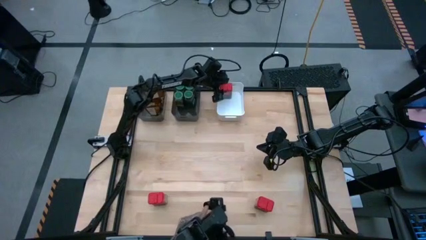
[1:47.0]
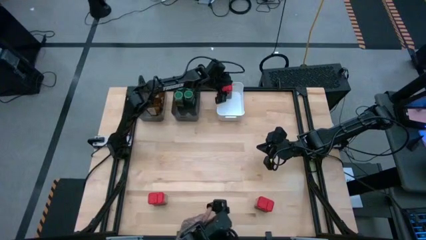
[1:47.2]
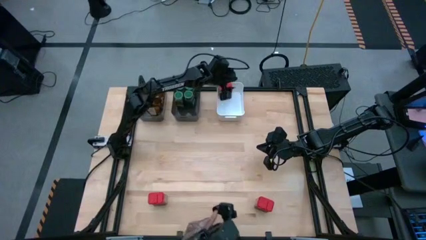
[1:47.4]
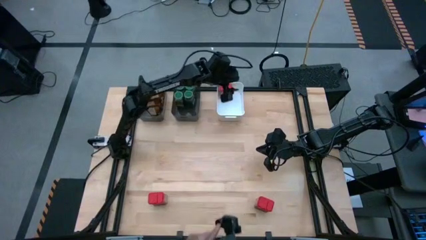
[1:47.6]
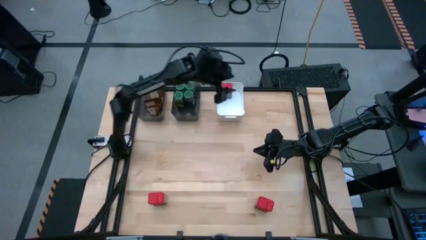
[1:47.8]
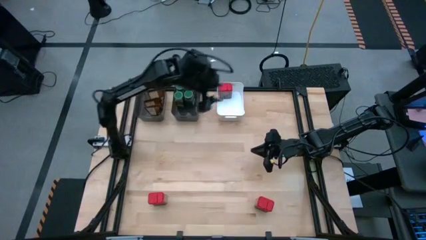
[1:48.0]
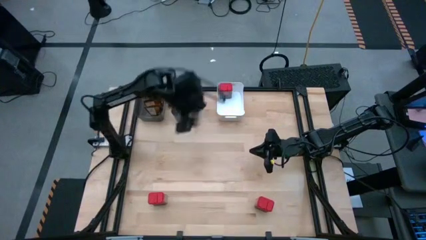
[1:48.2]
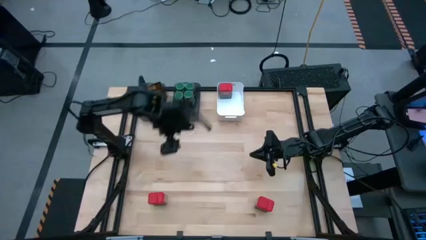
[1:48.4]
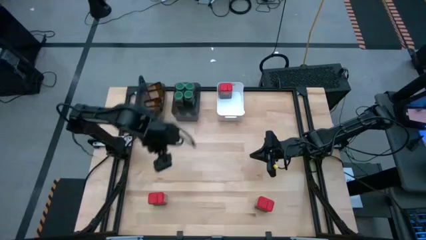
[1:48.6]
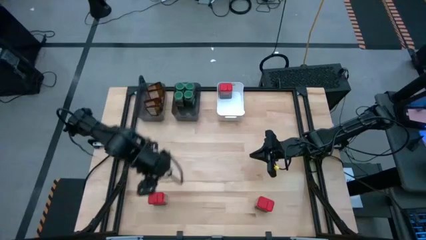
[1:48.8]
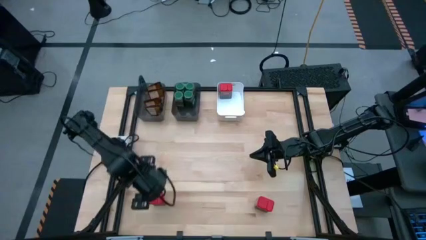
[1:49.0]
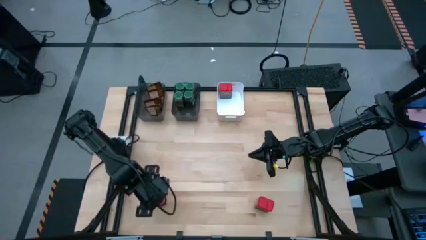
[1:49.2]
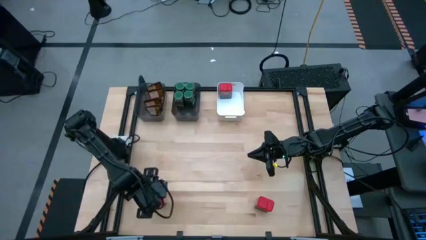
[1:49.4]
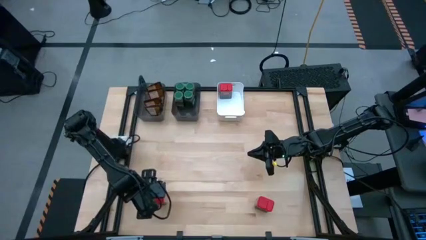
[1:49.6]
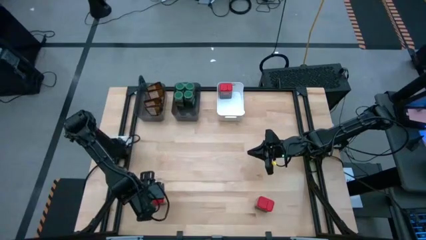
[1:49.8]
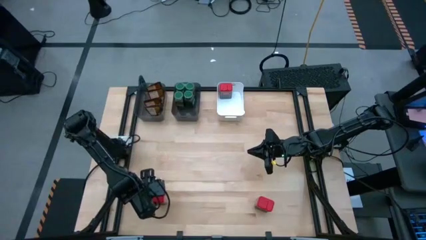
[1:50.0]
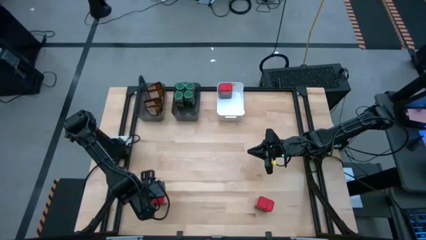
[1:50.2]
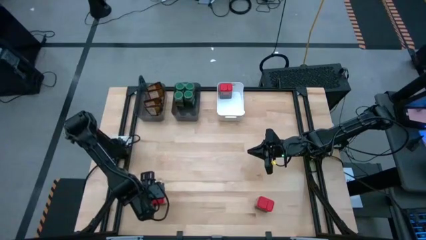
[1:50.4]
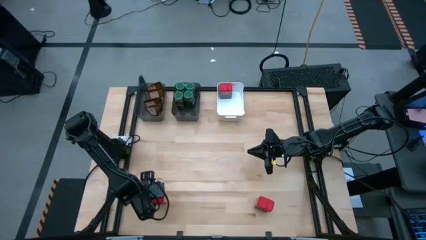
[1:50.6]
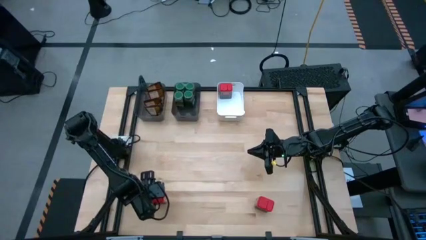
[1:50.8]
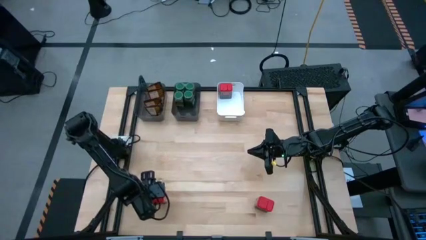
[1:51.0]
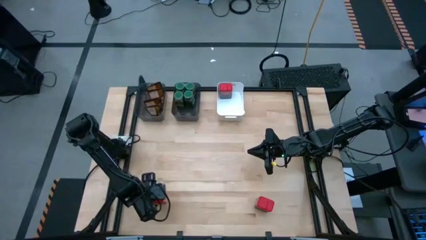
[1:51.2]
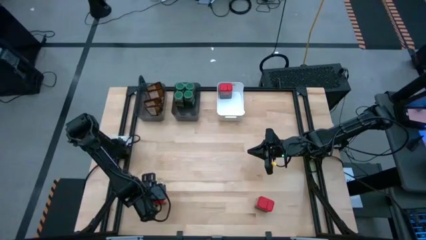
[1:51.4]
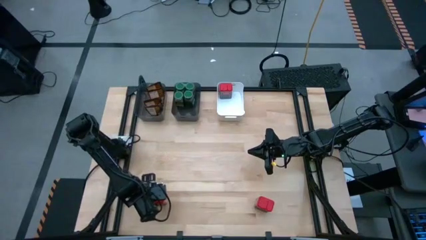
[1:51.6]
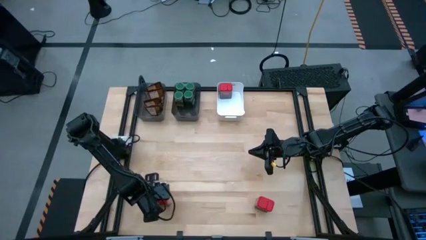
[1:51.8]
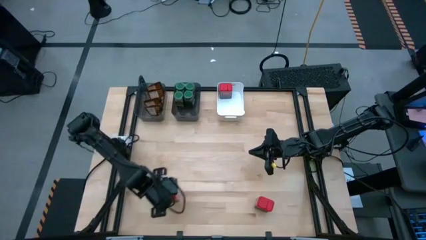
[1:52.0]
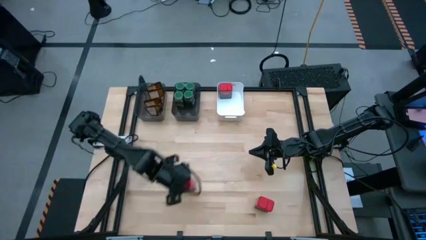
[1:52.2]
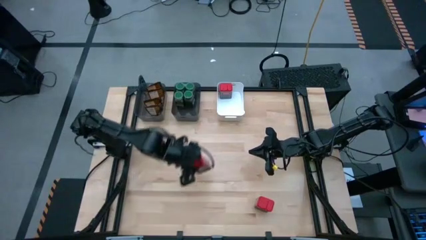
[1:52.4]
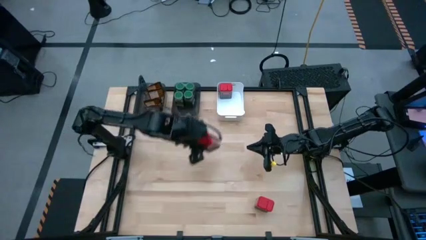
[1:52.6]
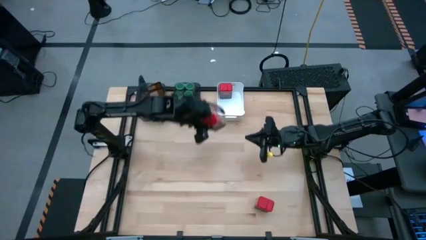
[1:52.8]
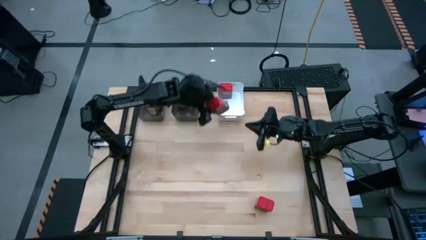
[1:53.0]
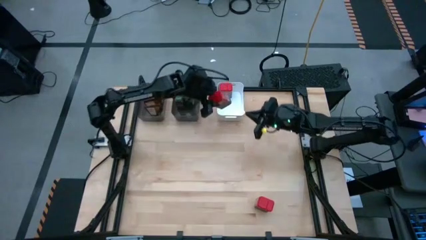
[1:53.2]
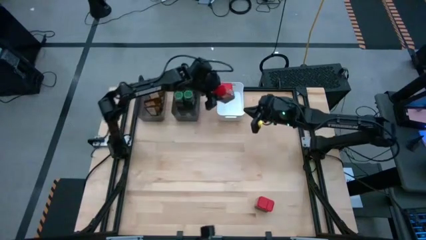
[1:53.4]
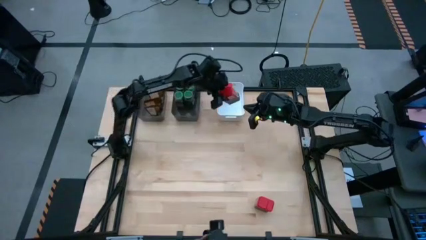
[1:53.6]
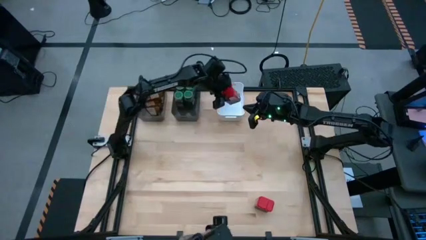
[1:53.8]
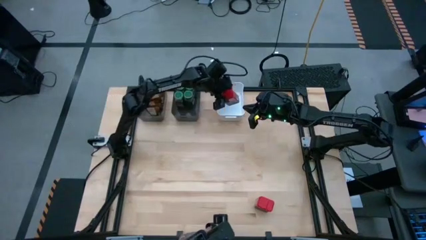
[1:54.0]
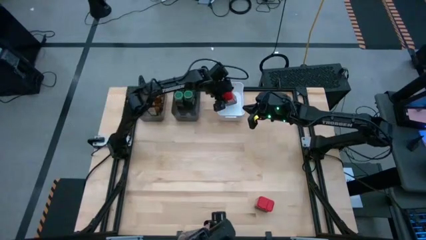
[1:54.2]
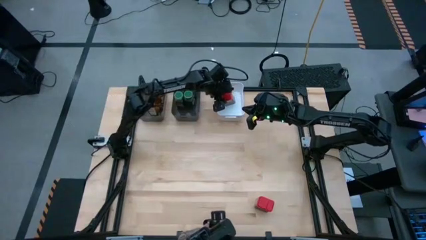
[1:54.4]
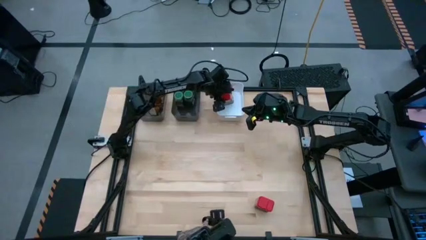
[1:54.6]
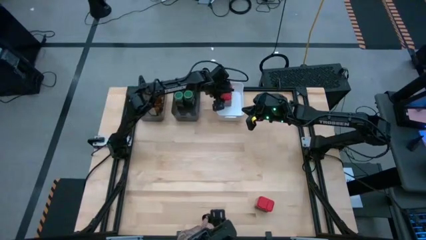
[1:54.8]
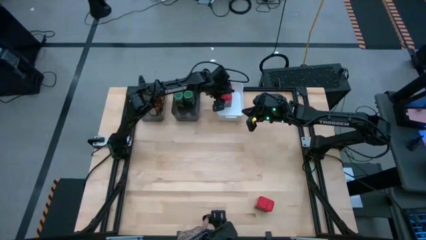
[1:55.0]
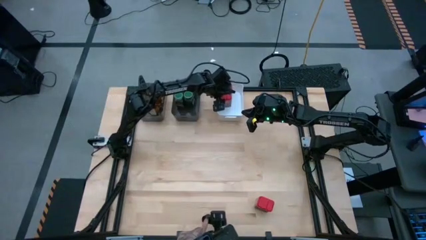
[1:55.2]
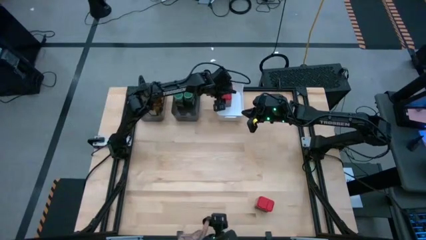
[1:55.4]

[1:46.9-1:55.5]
Task: Sort spices by type
Put the left red seasoning can into the white bin

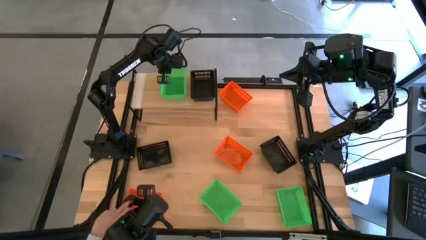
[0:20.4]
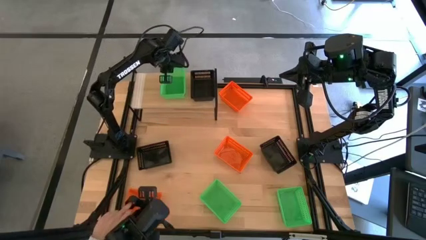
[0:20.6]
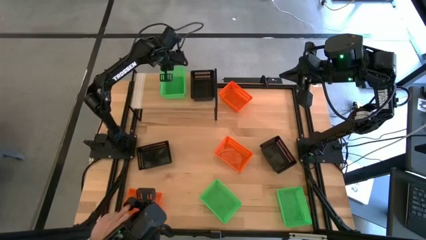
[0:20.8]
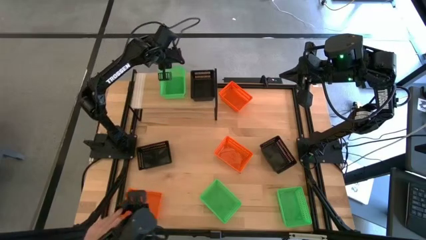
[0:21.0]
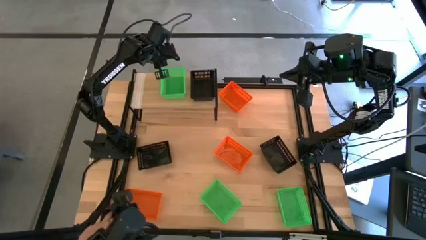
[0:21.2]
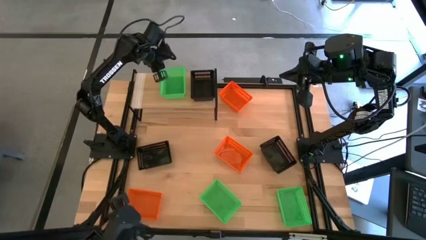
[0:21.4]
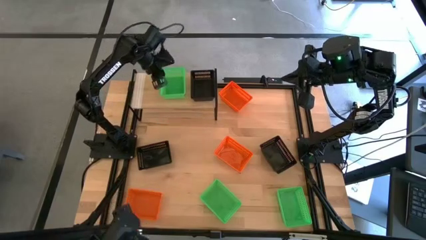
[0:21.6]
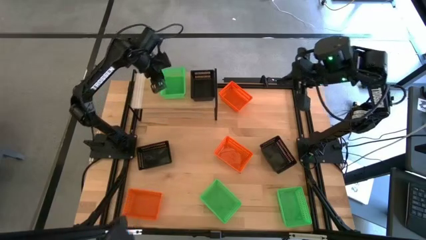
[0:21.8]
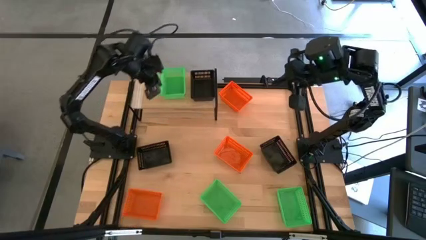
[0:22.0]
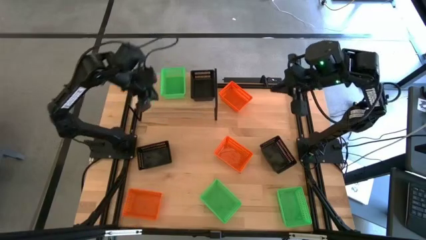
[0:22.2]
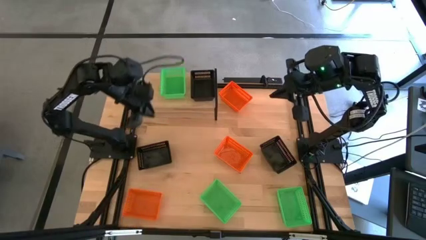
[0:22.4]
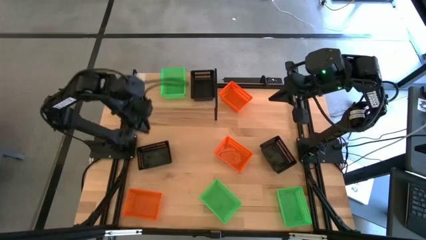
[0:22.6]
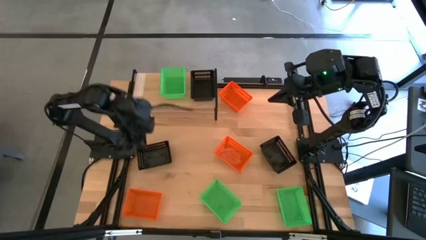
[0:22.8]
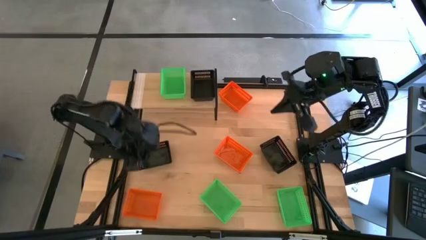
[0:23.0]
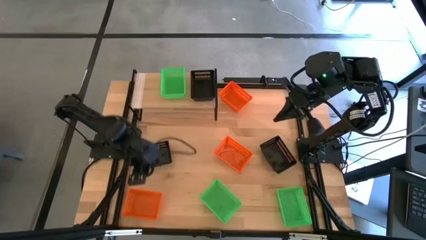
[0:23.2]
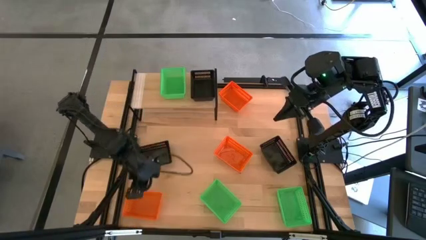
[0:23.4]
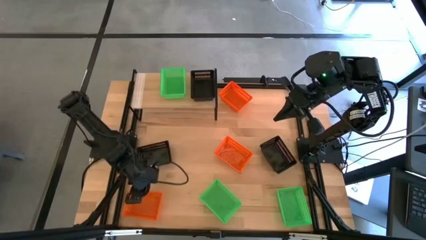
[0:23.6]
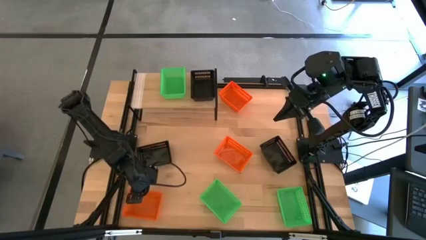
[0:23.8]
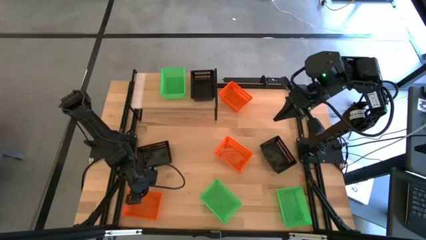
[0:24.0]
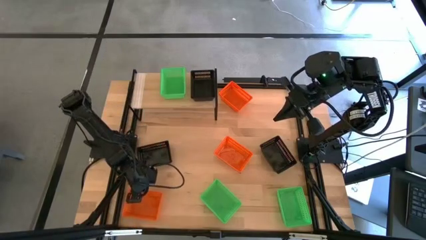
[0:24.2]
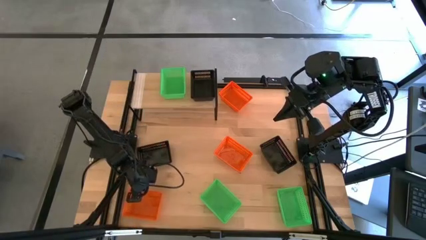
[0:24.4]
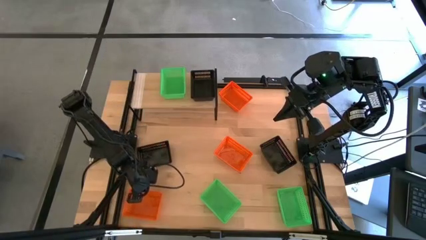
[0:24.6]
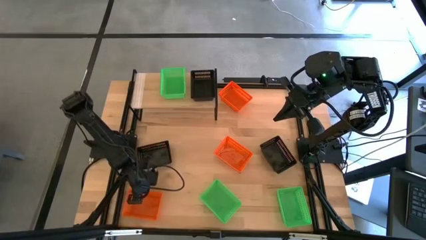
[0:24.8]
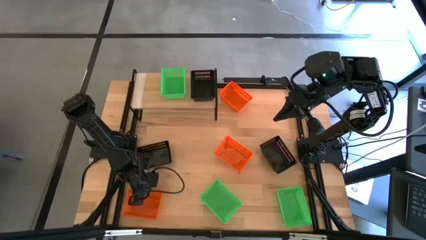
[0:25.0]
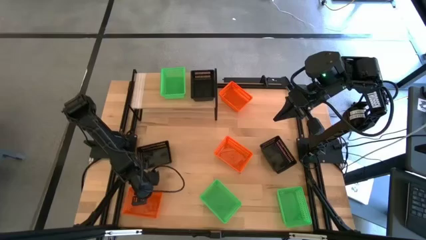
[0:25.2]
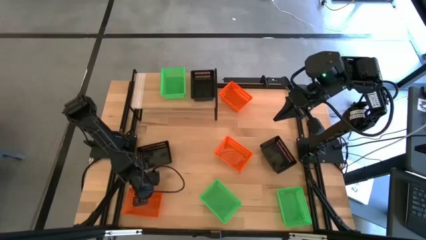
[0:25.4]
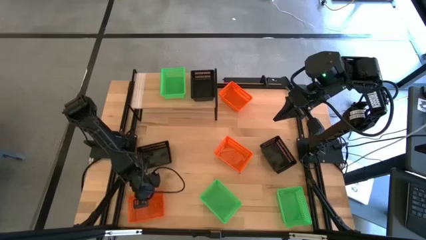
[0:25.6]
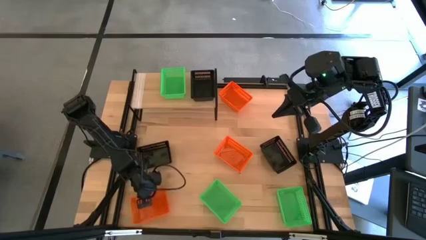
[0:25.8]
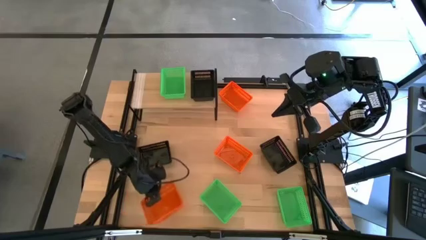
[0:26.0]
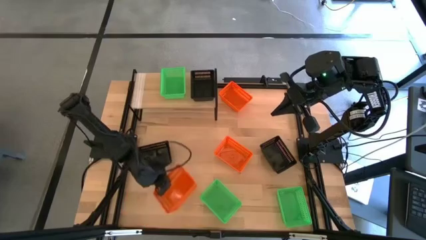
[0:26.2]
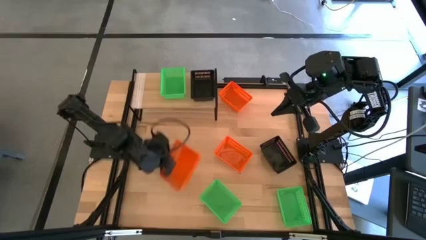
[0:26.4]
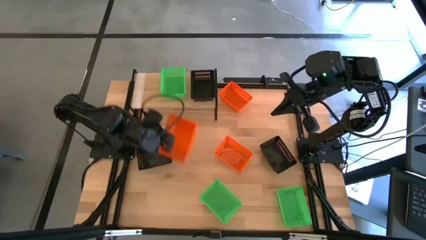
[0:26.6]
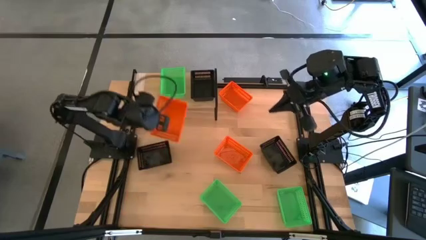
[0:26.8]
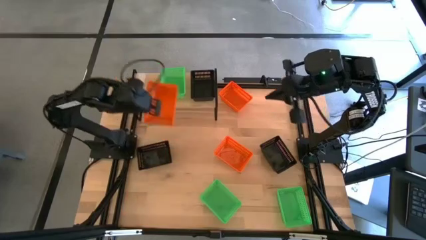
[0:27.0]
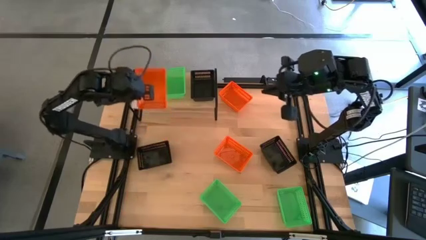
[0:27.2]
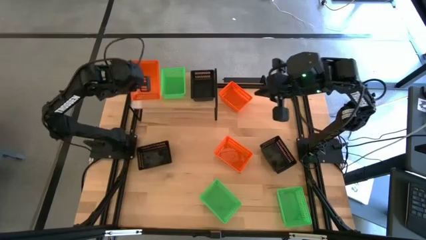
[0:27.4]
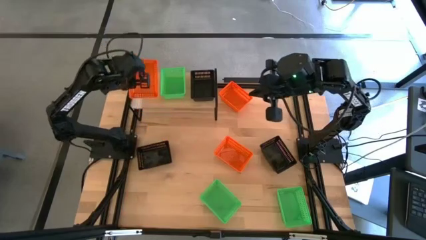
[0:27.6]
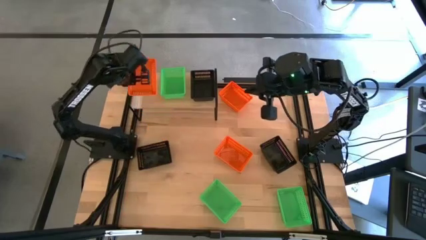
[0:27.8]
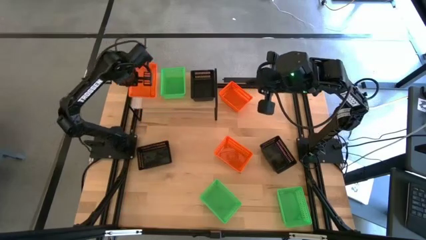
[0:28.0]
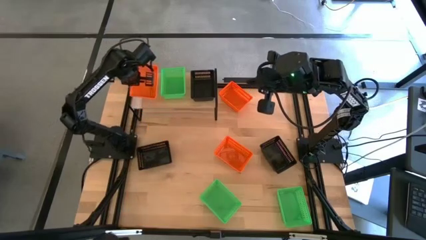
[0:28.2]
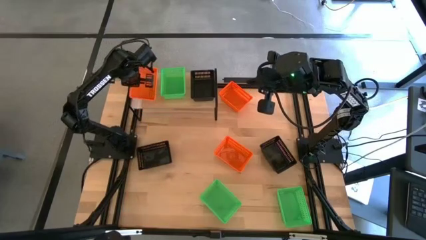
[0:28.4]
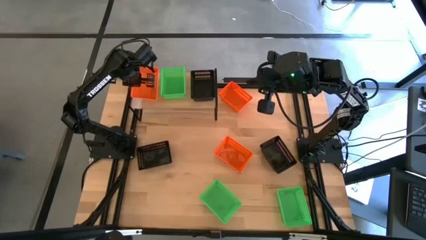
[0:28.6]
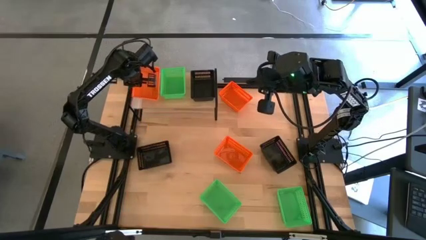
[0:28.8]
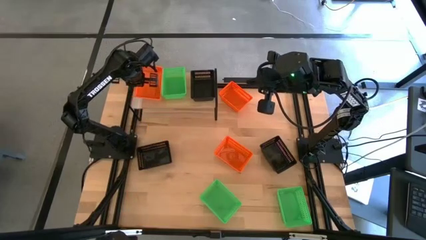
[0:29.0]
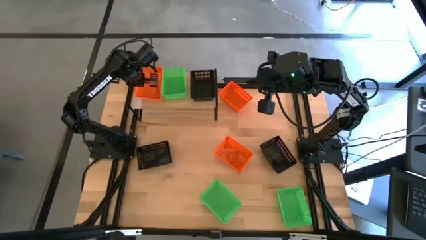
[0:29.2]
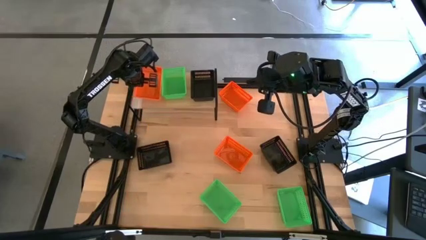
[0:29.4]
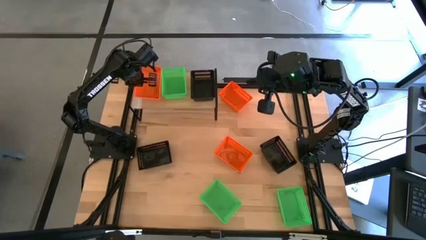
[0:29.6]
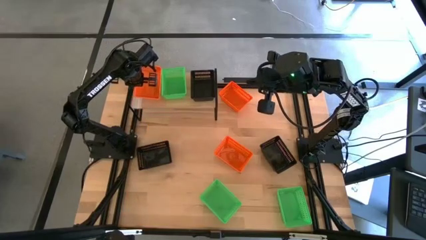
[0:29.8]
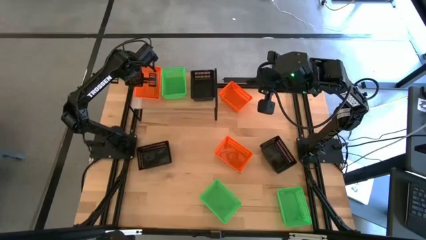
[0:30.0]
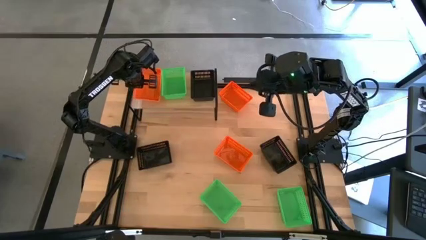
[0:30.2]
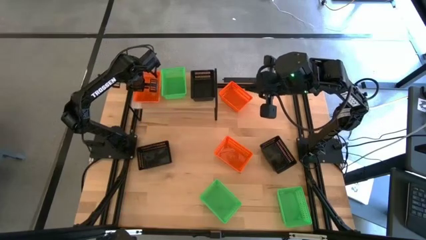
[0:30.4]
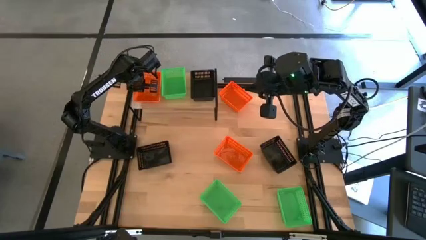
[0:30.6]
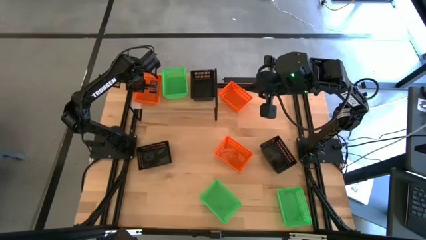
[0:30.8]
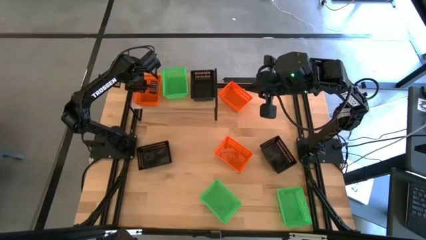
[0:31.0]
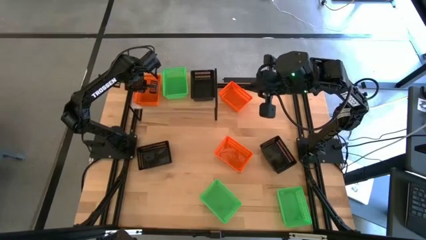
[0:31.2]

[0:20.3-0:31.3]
Task: Stack baskets on shelf by color
Put the bottom left orange bin on the shelf
